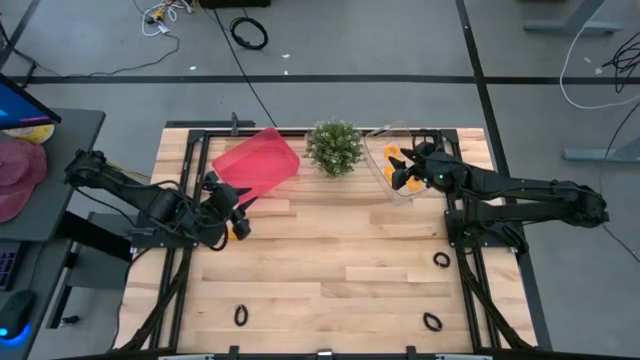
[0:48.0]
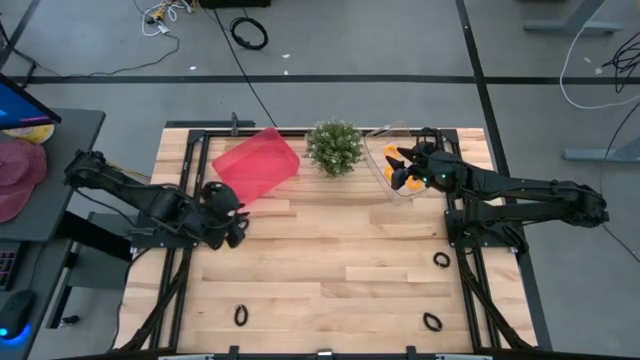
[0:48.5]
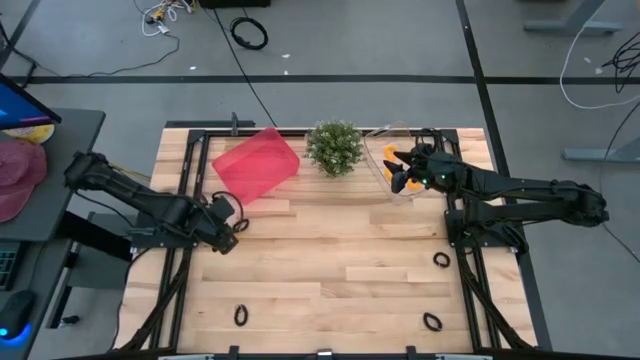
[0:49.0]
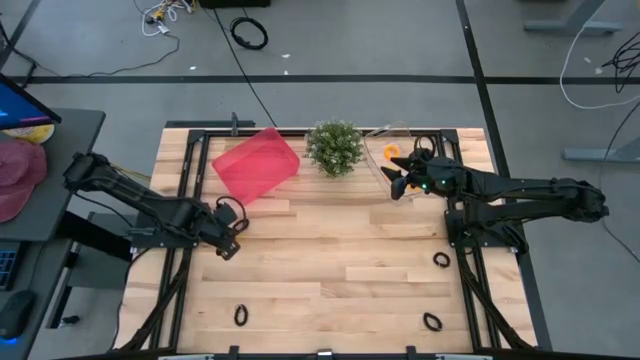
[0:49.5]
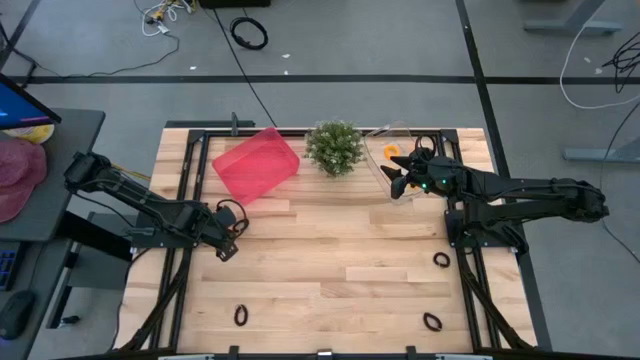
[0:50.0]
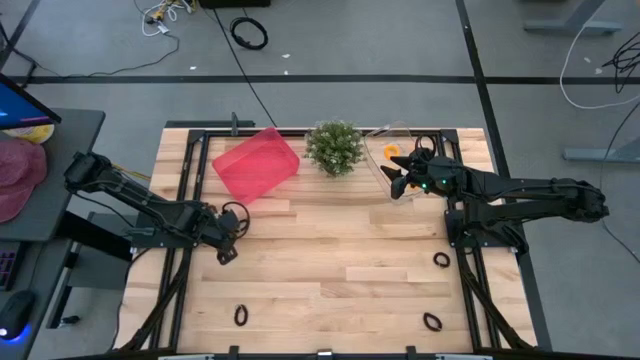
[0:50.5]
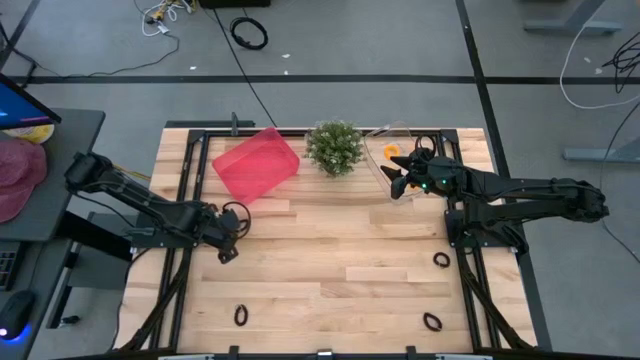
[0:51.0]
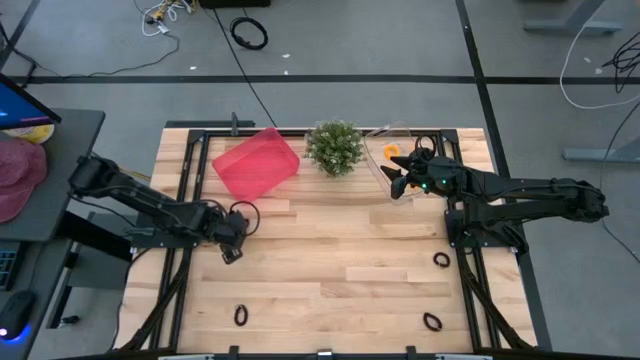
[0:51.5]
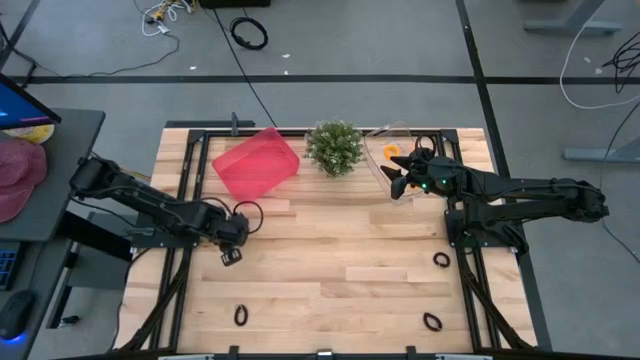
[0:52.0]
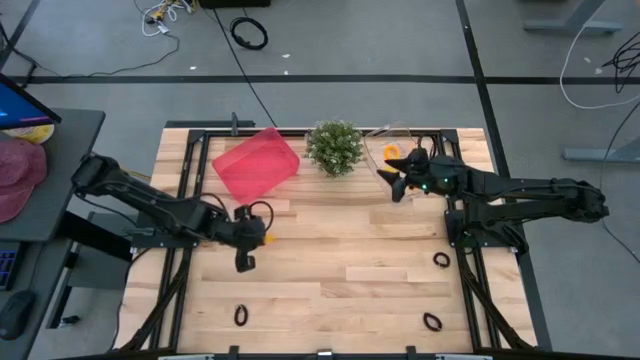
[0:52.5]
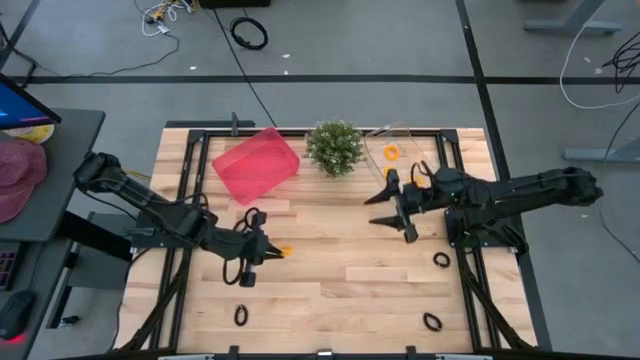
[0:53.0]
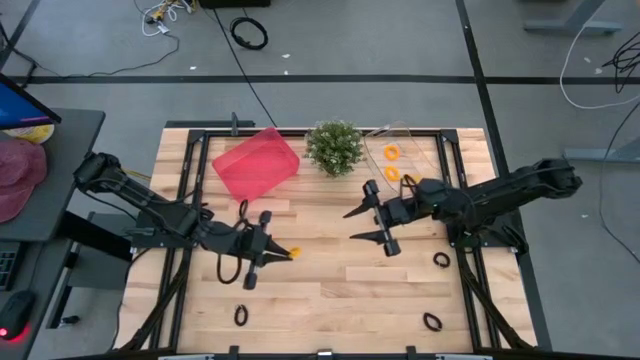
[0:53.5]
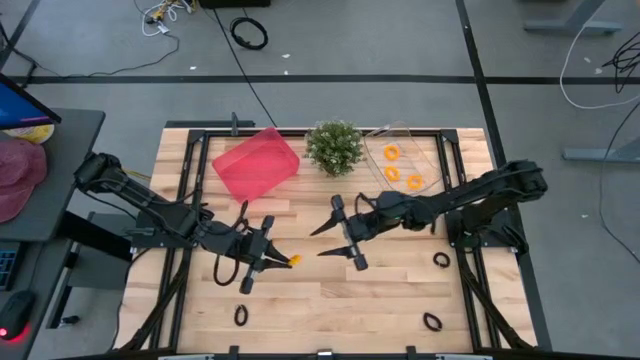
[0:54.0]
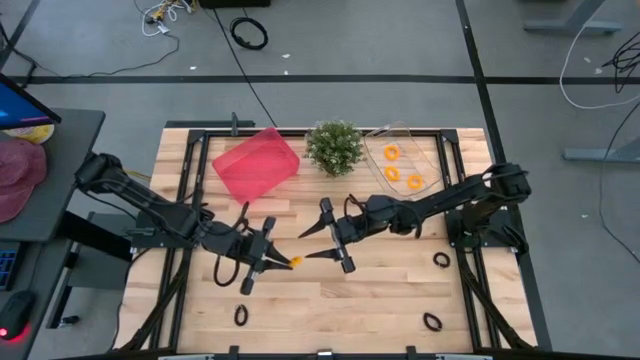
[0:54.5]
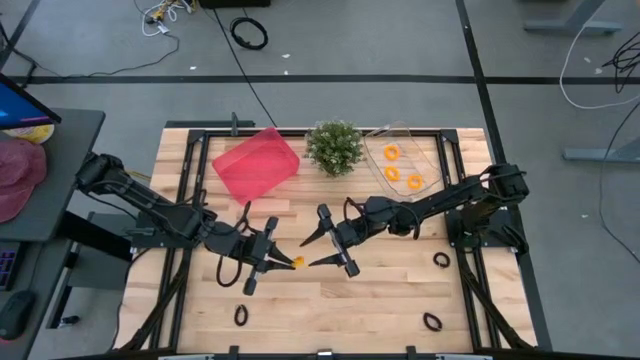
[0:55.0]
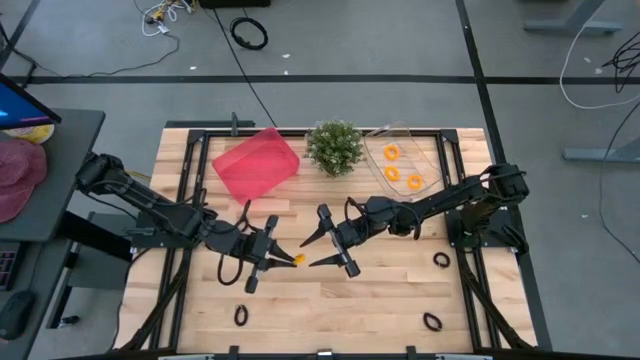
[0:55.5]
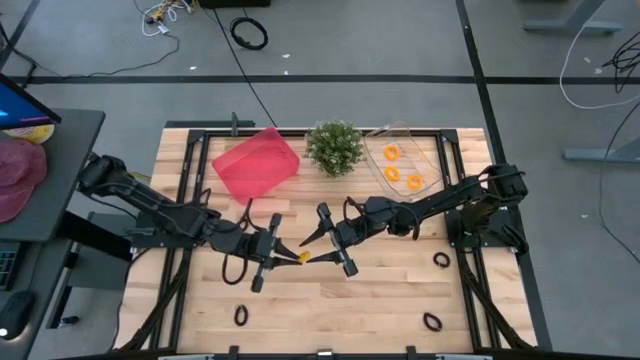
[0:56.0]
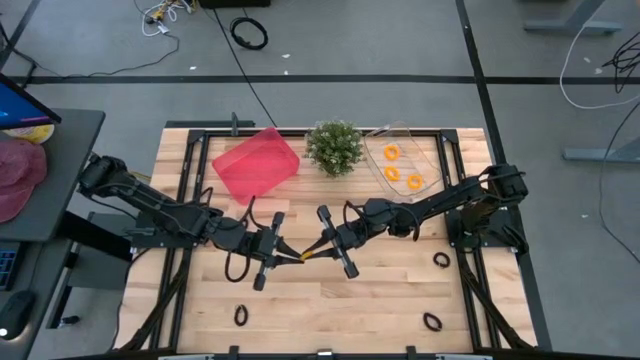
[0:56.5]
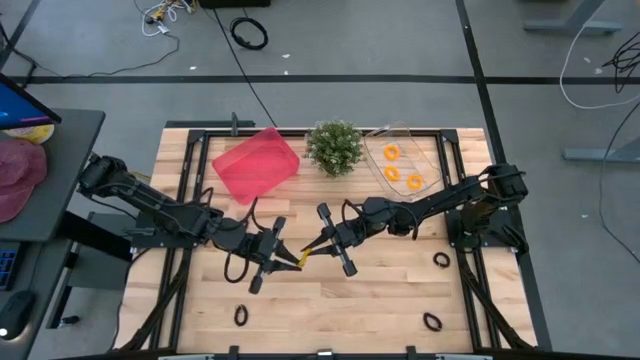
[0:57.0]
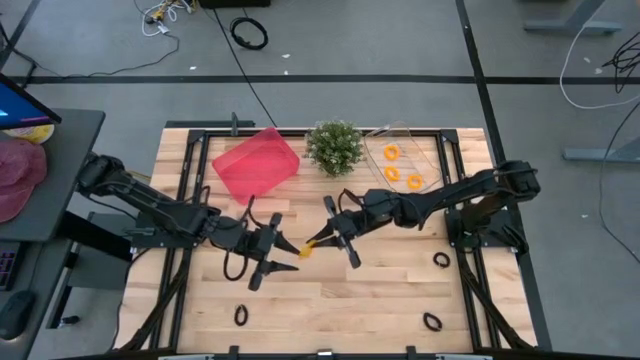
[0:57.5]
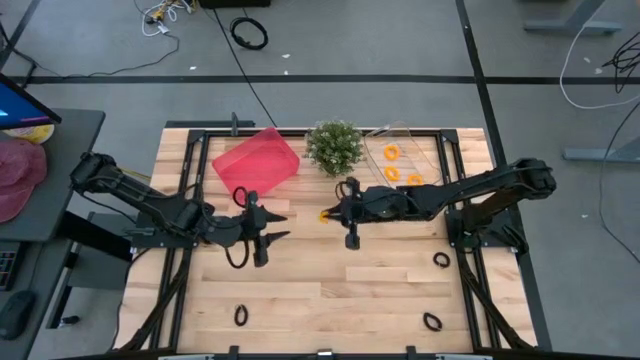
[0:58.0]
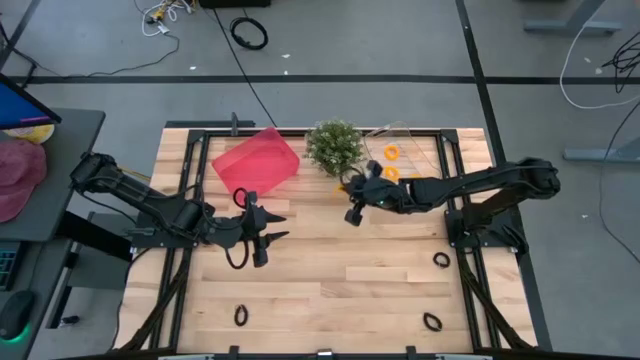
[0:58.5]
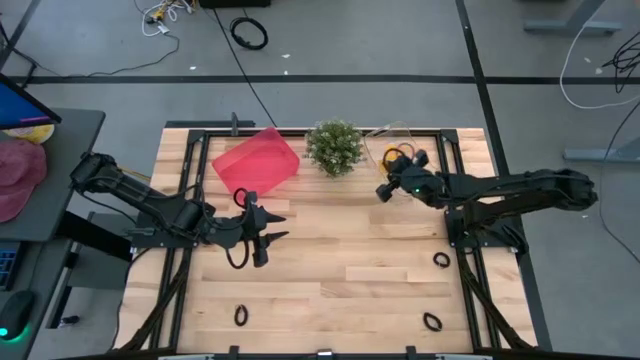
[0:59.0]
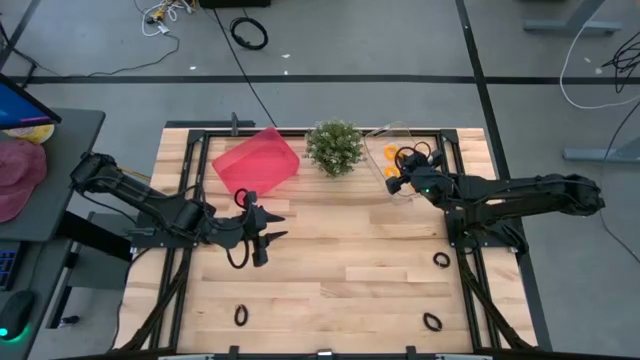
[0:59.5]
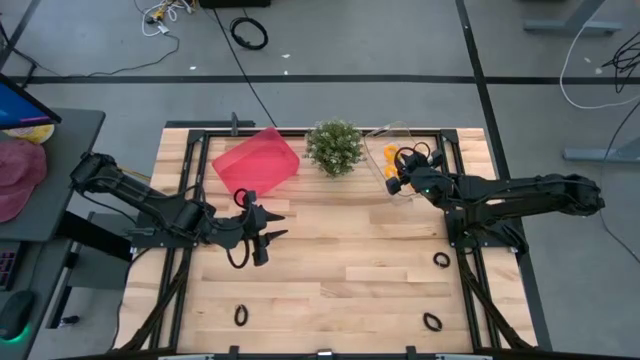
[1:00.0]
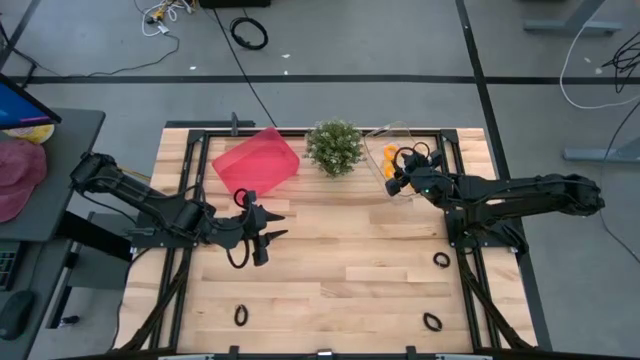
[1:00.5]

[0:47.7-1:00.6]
Task: Sort spring keychains
Put the yellow spring keychain into the transparent bin

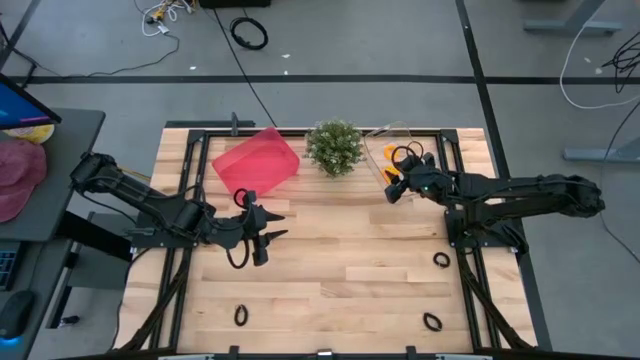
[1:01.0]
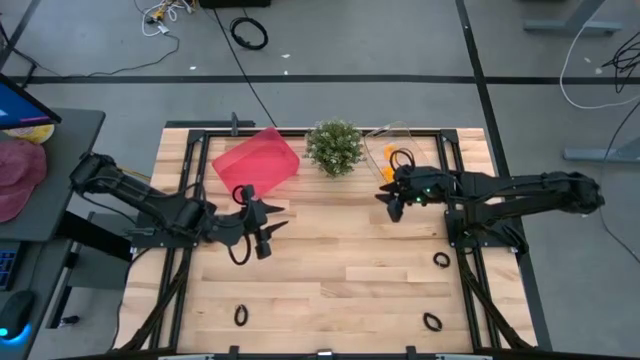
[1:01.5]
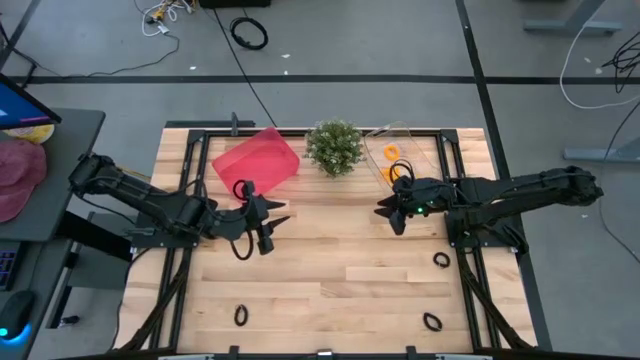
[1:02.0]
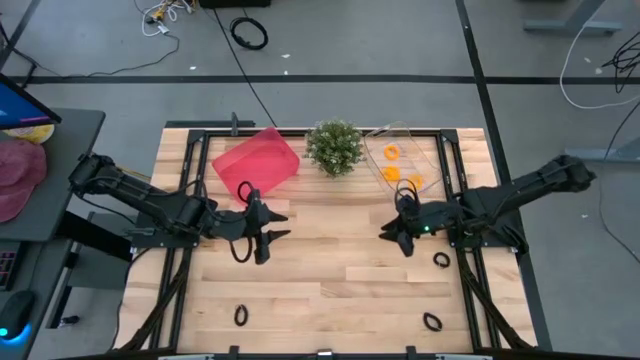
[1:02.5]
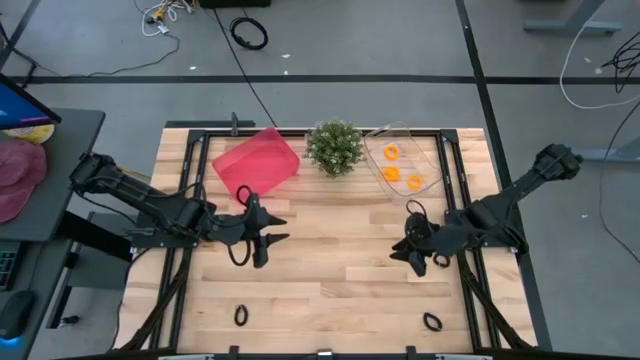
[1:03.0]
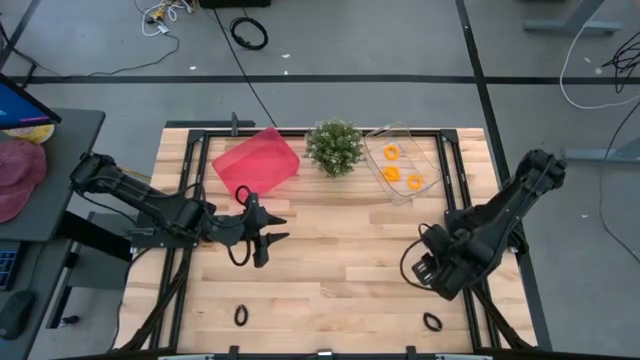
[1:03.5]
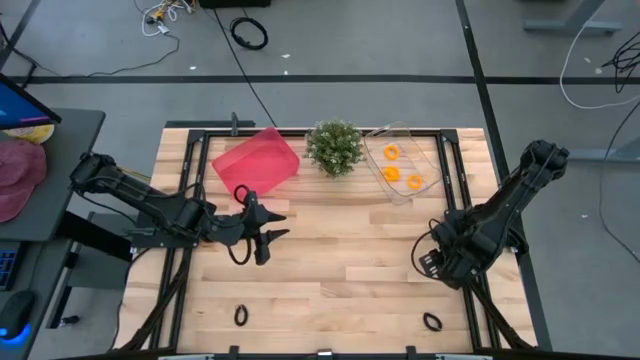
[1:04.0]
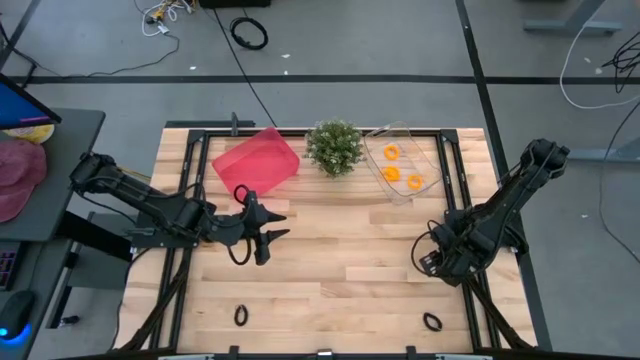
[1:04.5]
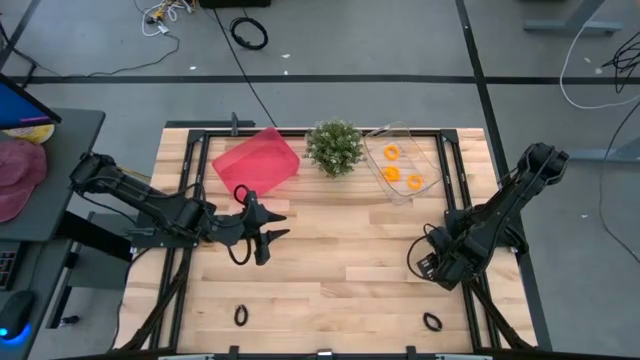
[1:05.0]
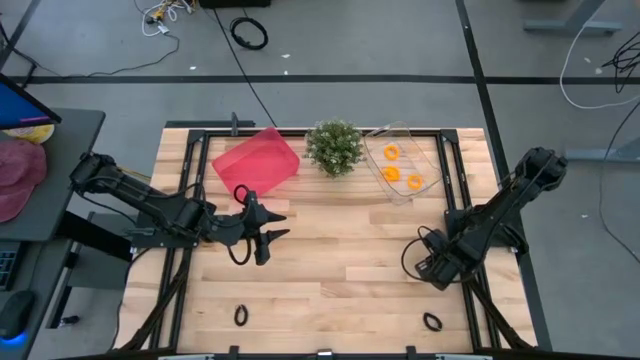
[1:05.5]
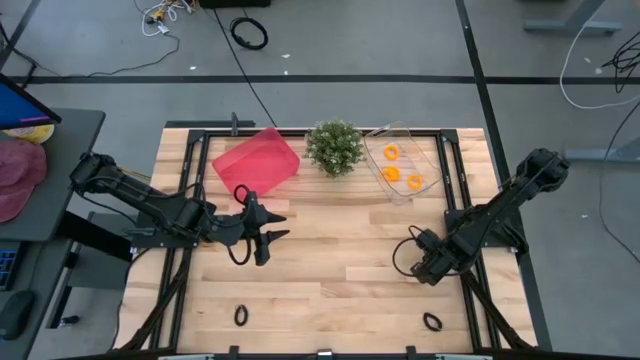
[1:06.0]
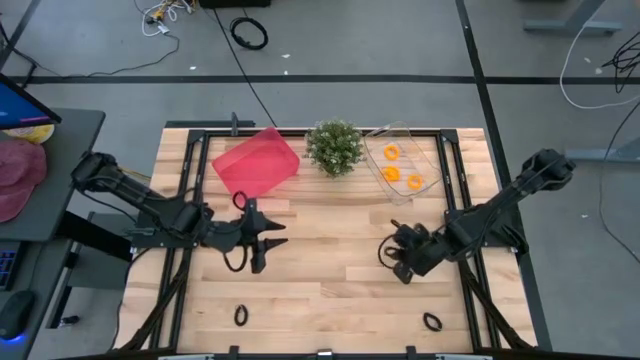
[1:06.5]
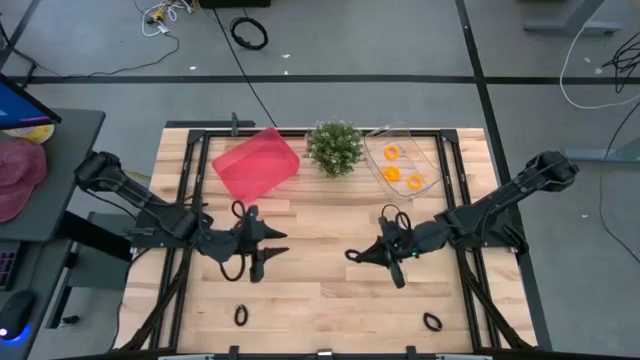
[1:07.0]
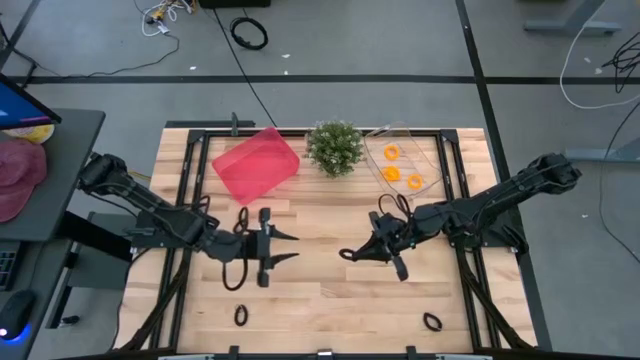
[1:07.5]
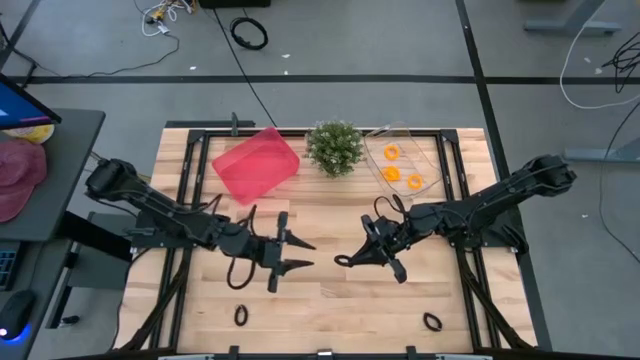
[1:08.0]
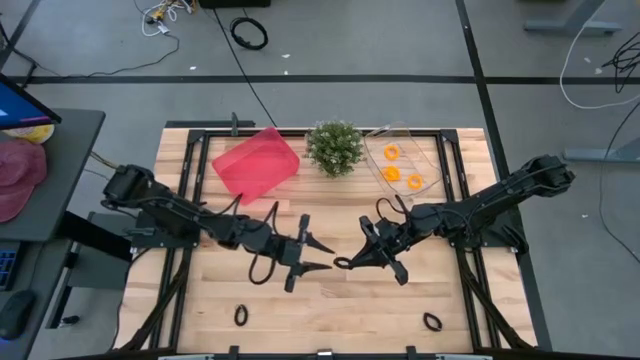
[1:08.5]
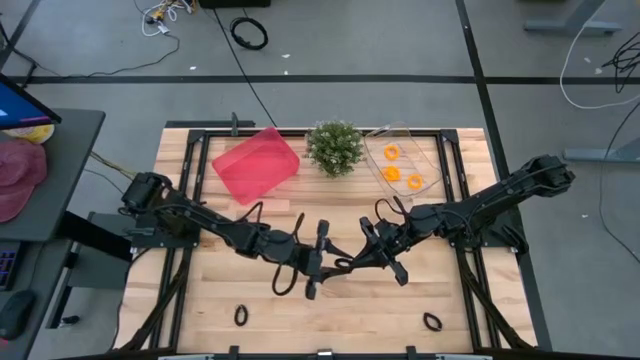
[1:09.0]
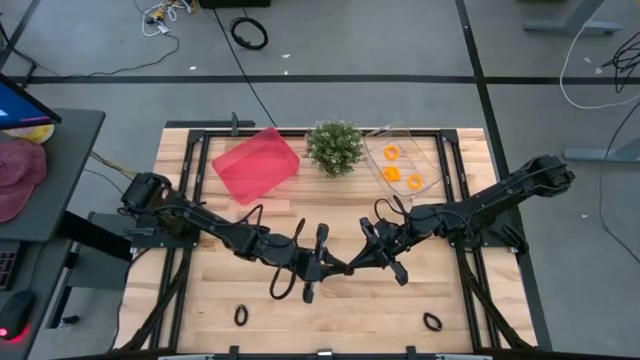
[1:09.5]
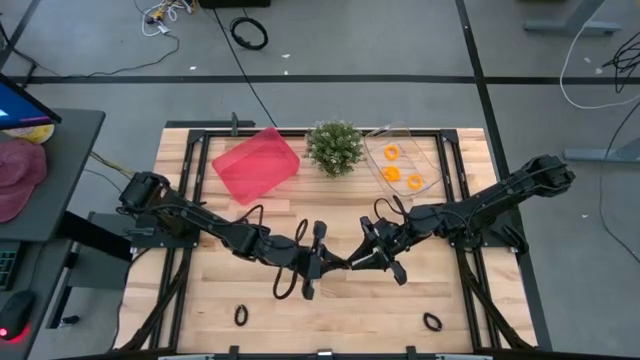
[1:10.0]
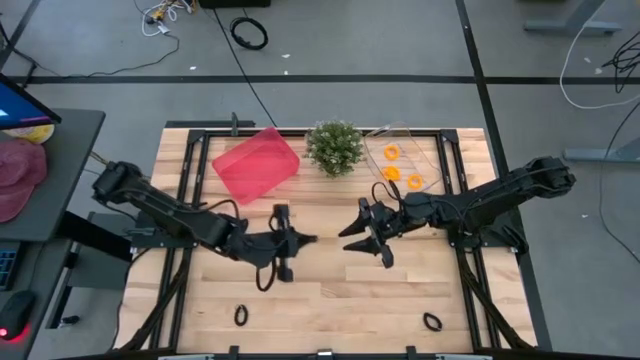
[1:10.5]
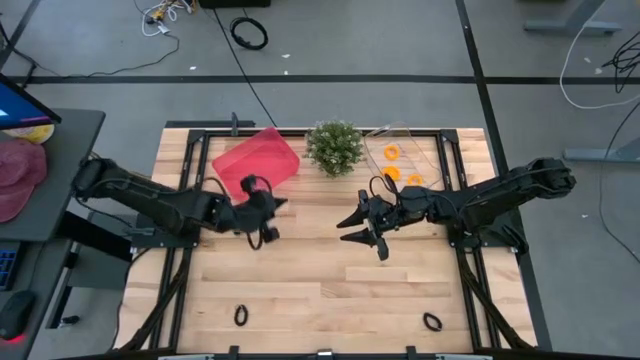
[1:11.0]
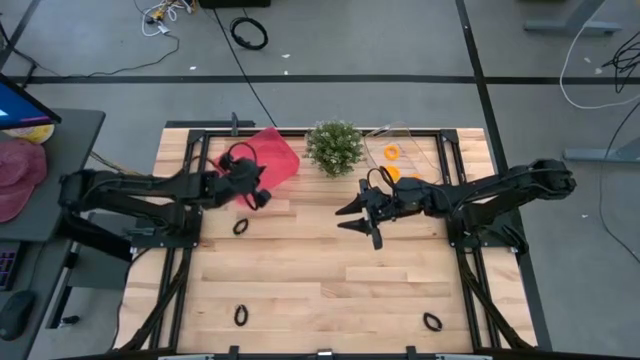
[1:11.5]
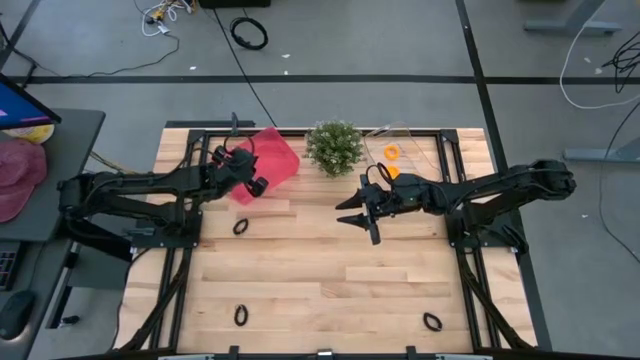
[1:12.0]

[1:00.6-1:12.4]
Put the black spring keychain into the pink bin
